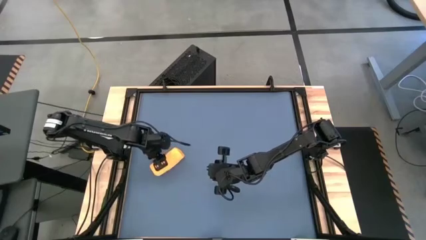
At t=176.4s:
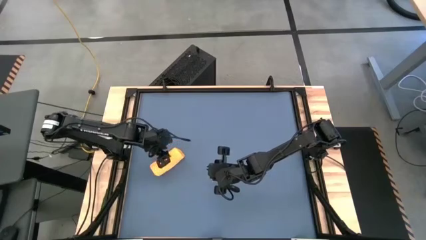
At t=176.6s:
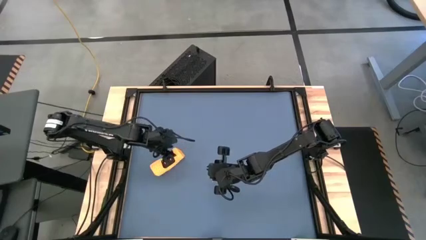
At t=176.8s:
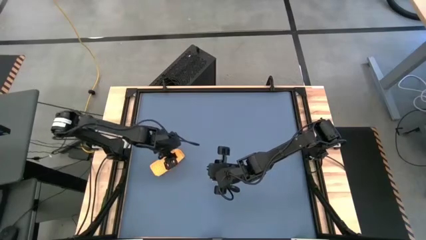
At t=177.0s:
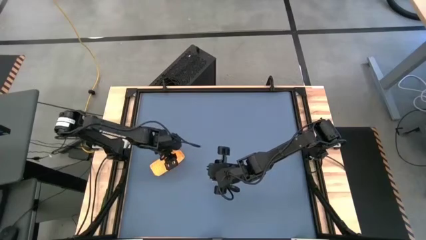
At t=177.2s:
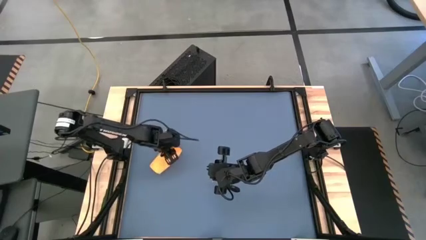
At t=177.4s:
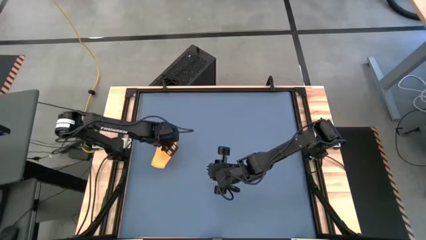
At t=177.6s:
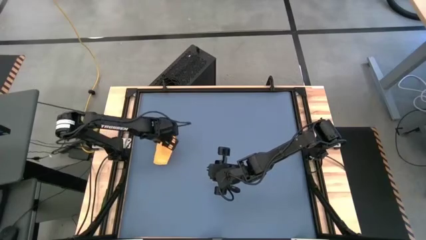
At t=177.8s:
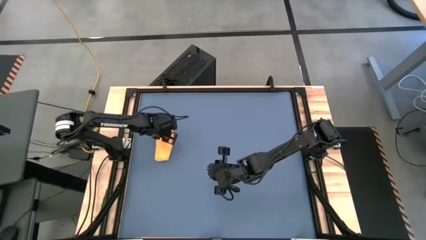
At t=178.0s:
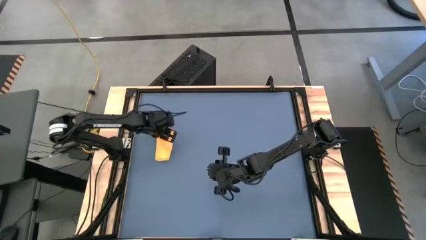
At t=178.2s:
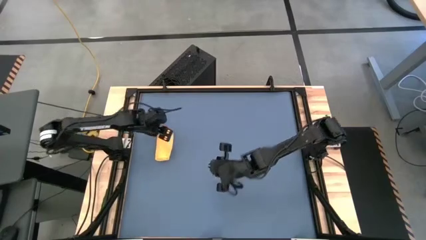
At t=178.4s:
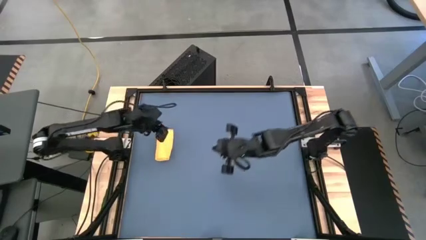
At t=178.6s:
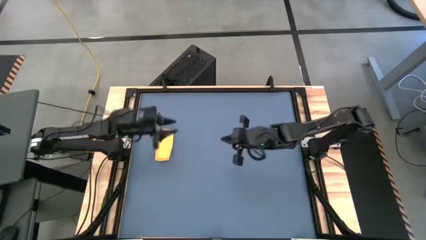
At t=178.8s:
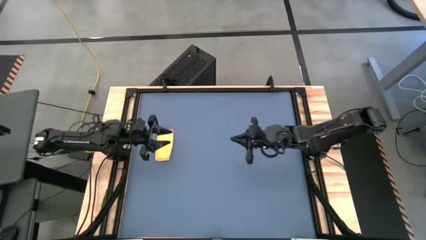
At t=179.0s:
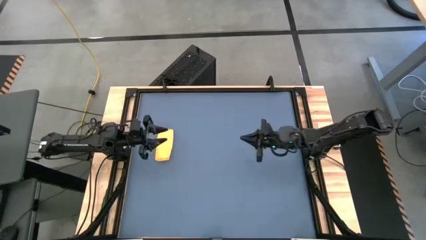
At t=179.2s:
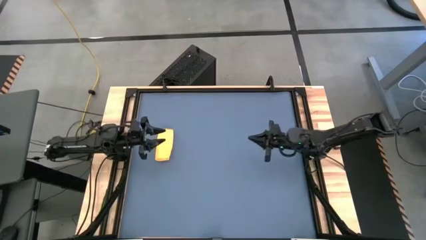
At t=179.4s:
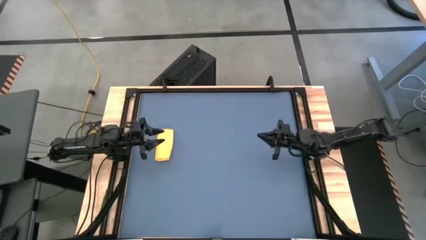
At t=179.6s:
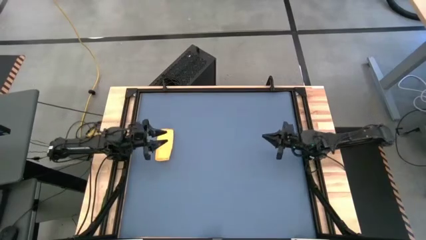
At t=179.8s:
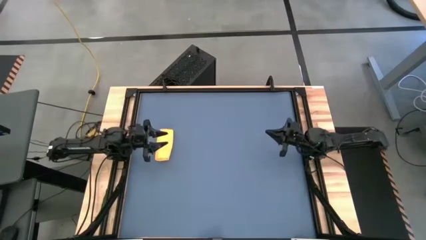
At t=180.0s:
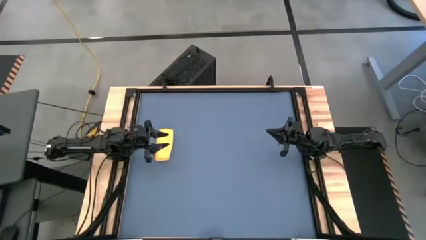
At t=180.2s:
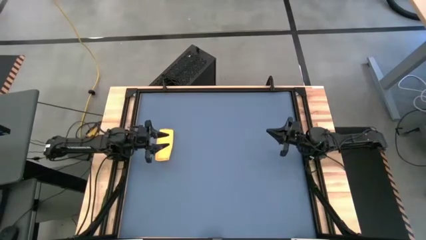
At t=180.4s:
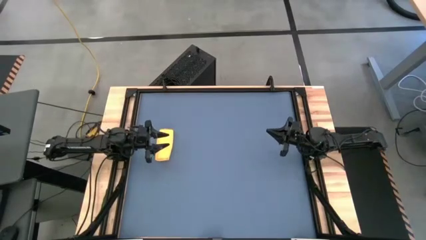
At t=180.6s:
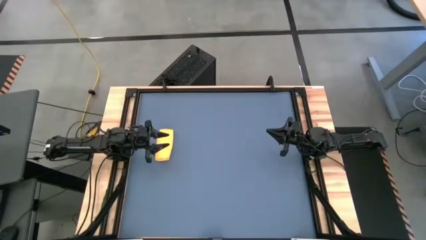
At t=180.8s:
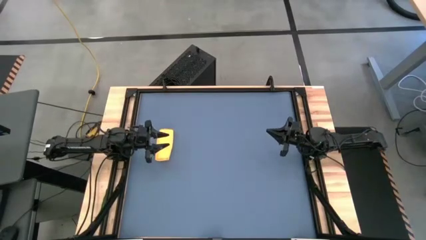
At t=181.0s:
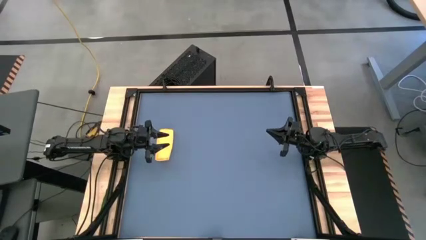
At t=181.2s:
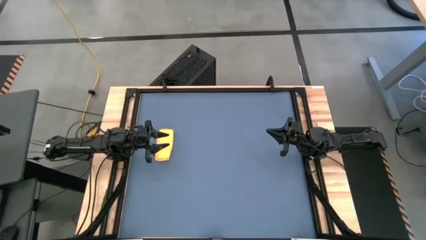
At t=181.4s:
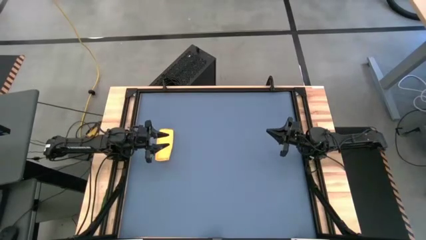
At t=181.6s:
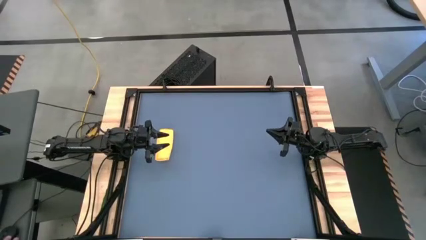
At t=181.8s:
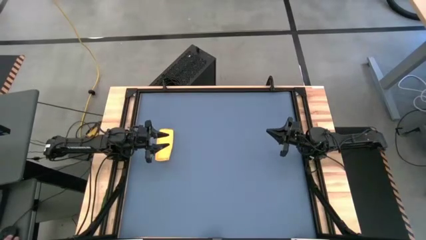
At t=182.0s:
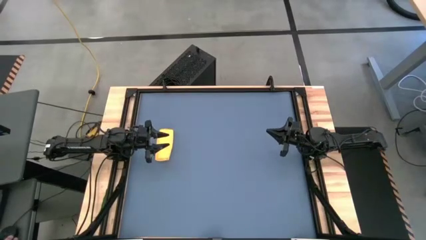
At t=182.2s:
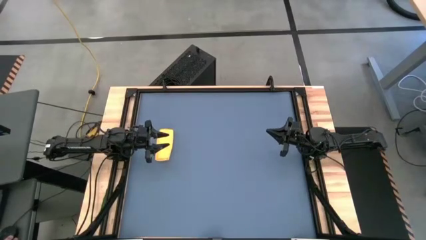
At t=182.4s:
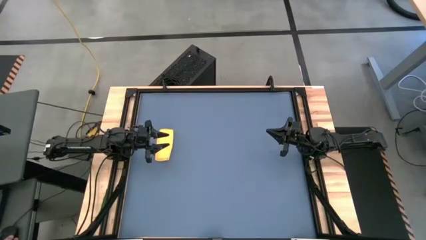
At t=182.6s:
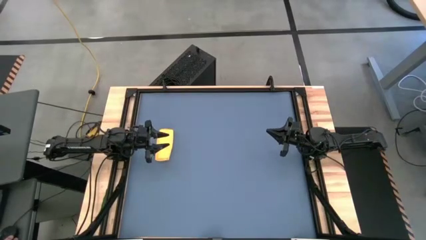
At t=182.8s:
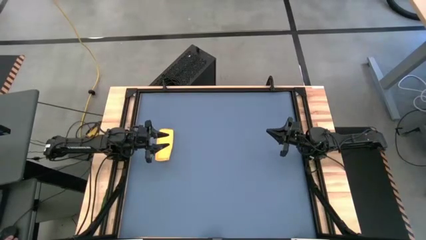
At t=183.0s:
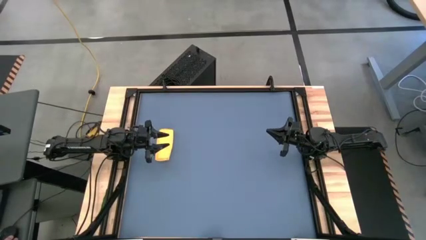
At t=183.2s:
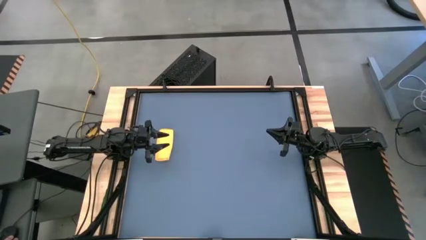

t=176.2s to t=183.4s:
Task: Roll towel
Return to Home Position

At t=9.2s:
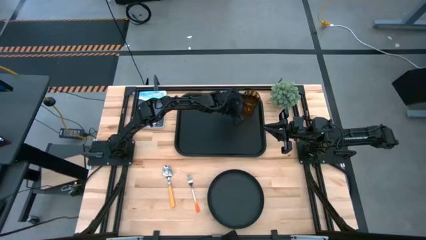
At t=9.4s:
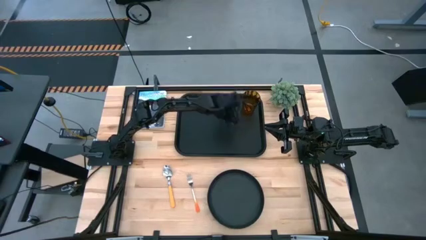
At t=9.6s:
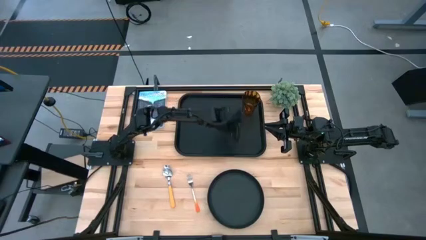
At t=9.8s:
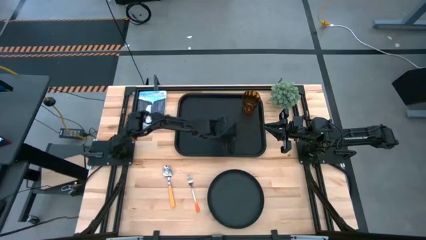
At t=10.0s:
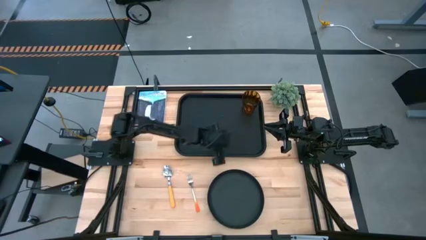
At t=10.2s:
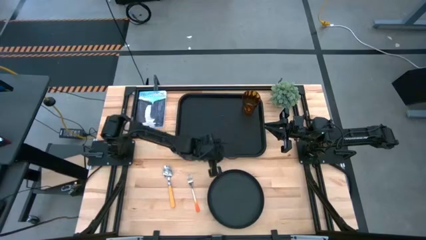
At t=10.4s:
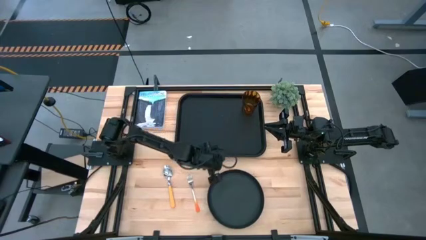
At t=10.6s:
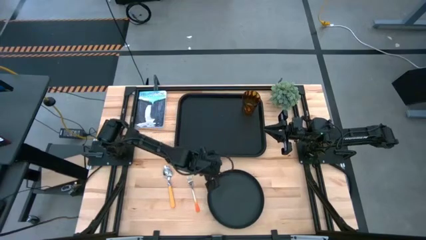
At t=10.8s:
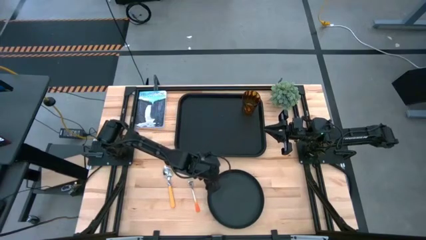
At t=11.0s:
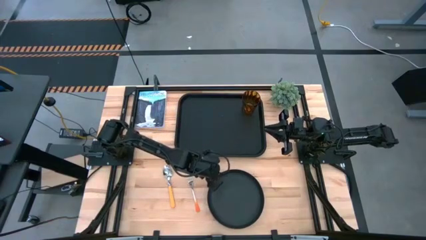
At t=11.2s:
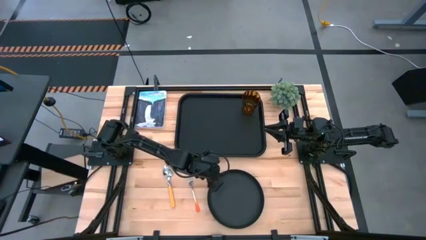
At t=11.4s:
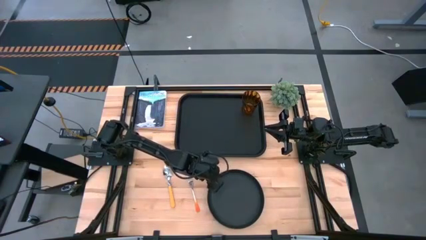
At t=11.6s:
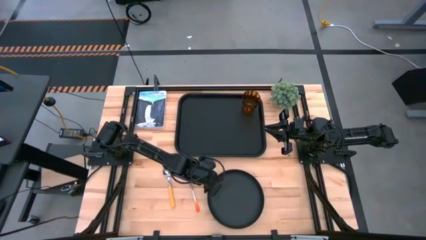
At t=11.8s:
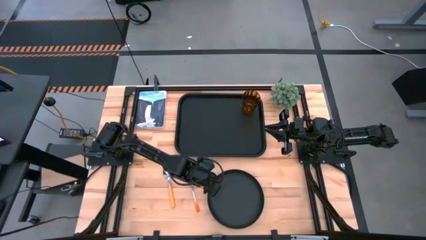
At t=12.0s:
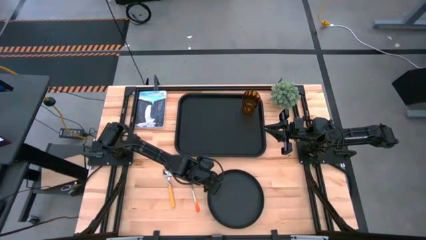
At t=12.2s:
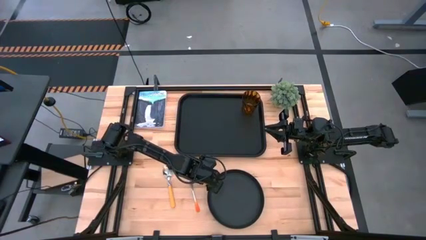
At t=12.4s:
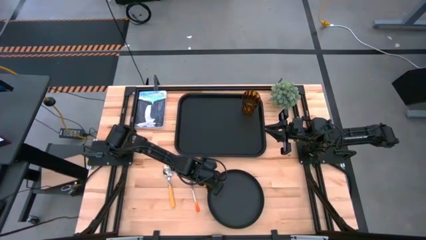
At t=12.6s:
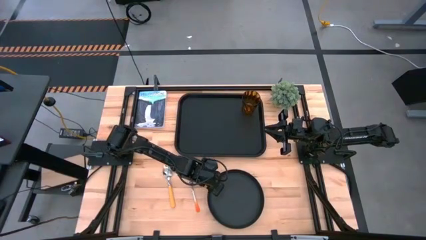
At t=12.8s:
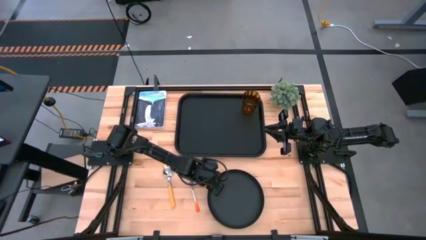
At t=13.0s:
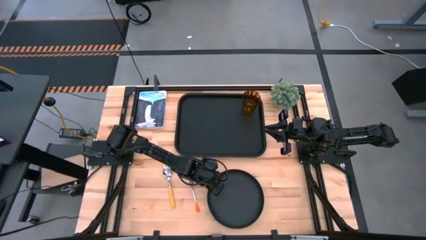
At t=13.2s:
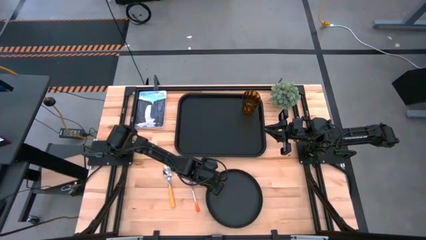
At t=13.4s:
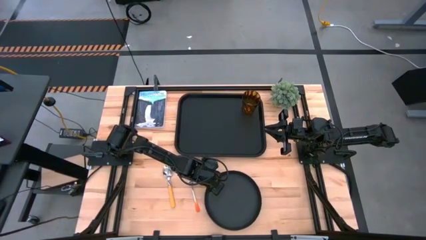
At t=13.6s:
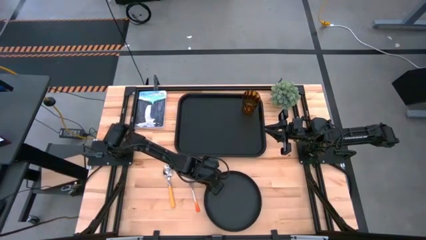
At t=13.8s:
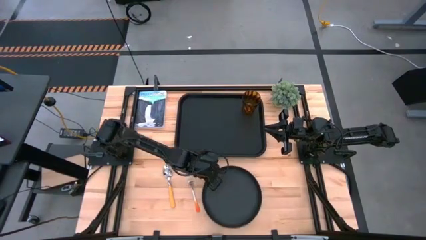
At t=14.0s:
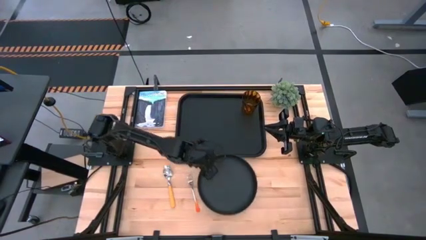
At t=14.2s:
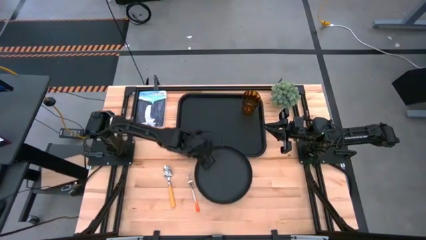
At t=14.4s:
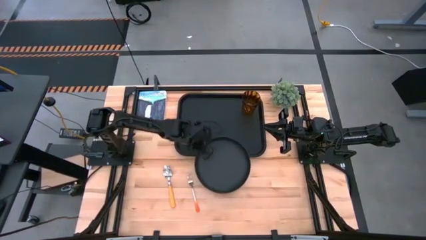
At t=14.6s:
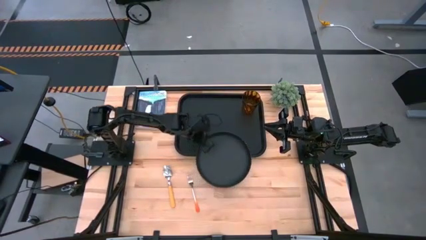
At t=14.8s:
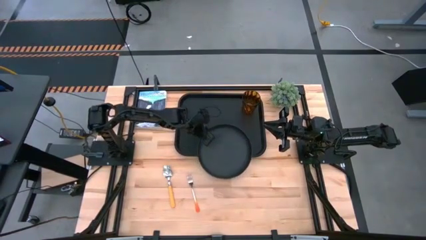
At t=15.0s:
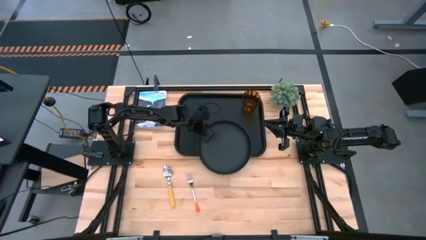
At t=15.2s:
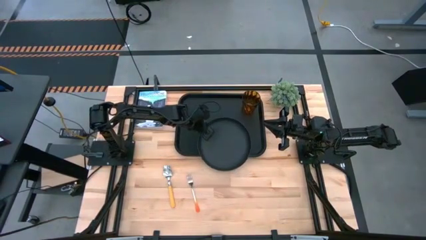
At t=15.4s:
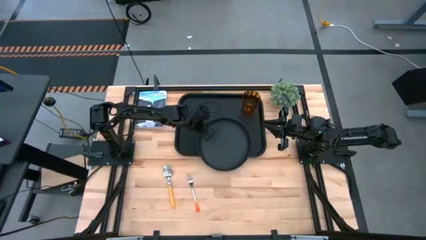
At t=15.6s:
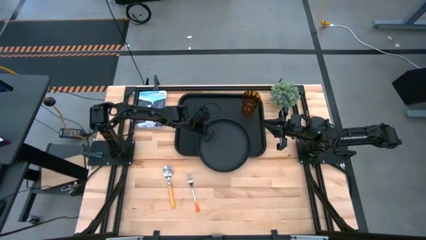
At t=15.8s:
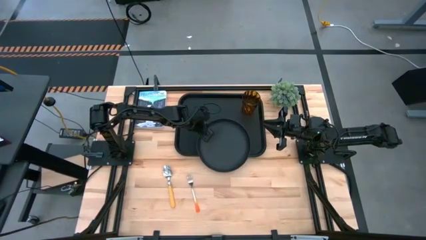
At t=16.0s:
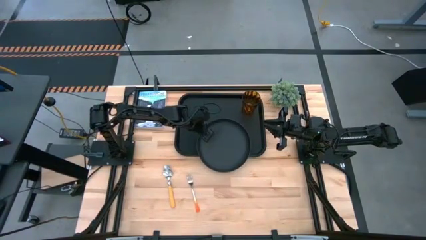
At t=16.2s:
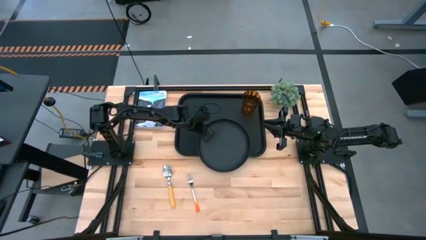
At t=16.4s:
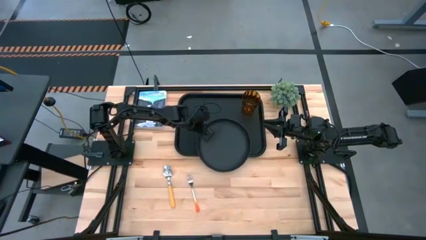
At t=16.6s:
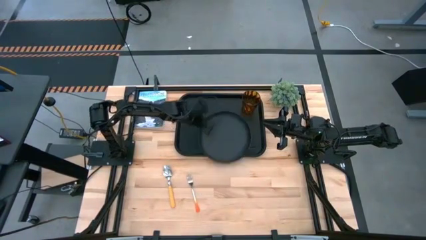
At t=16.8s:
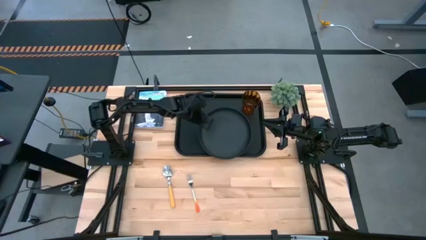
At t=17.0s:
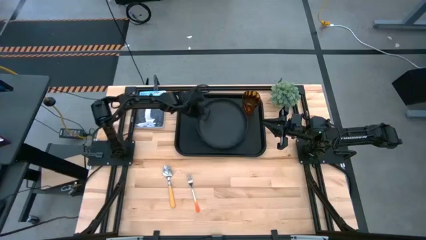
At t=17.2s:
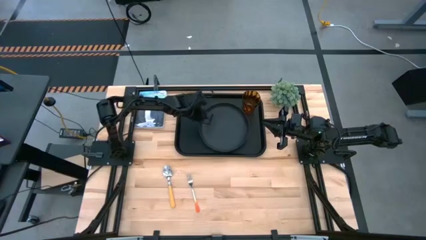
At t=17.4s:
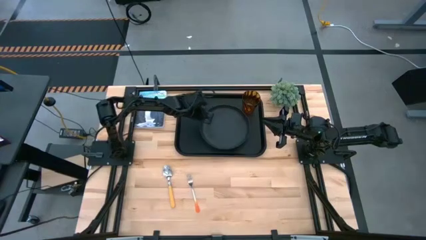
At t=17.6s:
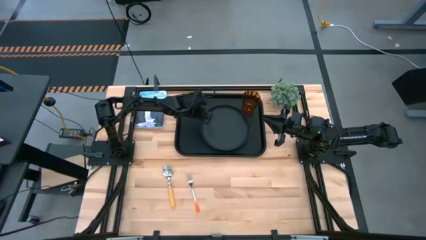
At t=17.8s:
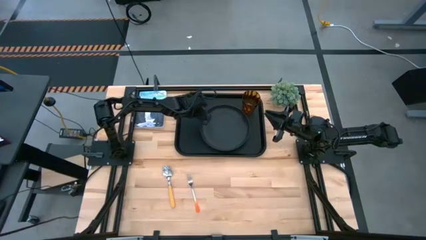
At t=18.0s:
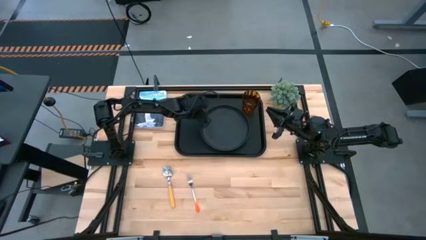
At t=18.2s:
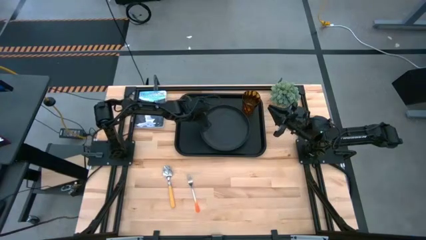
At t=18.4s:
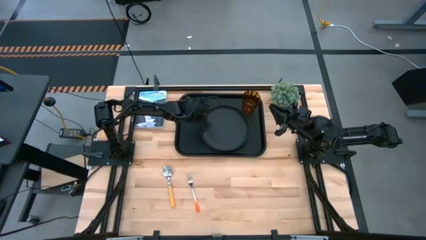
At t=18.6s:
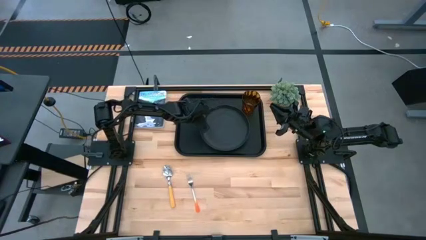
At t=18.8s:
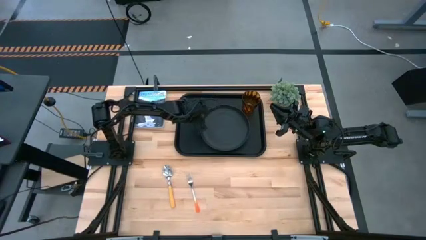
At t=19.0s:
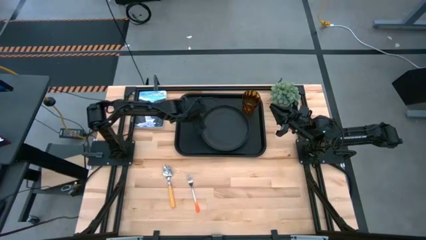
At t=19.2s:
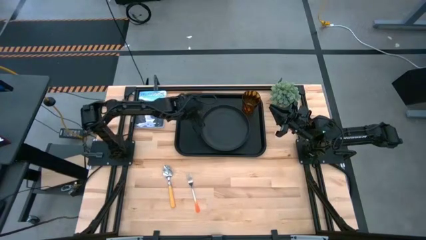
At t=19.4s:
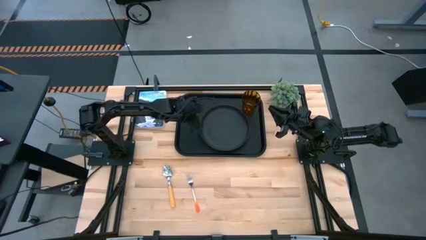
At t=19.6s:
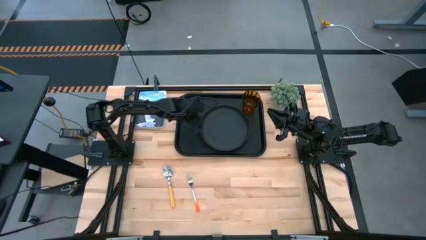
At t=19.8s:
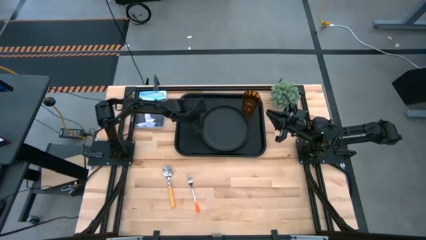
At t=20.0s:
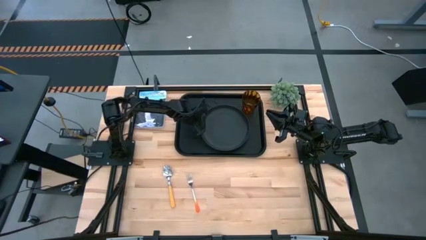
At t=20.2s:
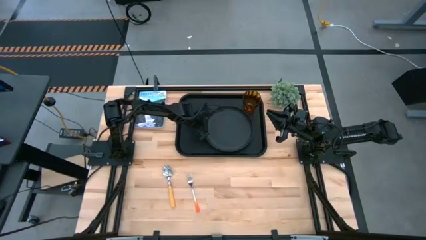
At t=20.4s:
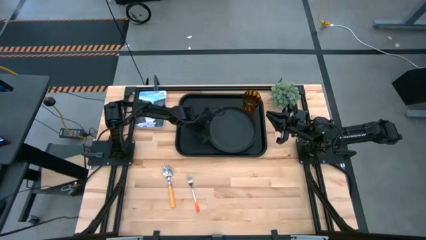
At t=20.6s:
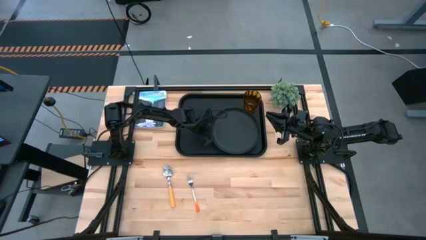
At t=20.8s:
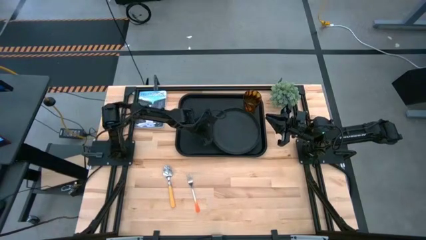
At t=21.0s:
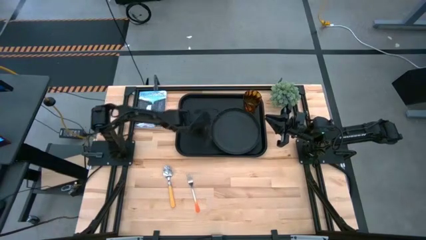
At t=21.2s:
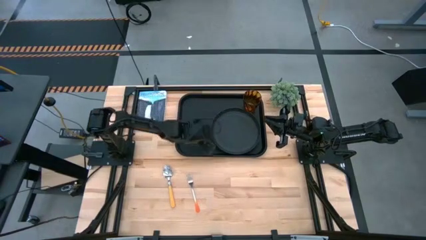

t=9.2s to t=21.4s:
Task: Pick and place plate/cup/fork/spoon on tray
Put the black plate on the black serving tray below the orange cup
